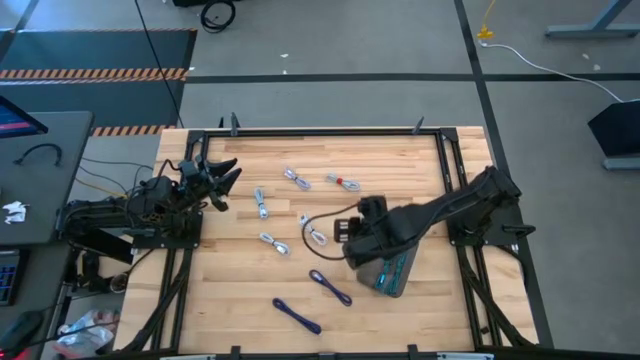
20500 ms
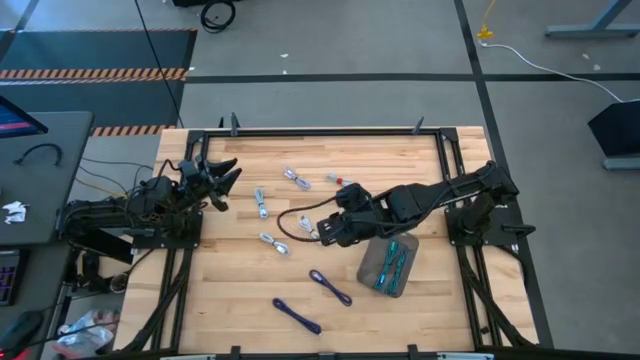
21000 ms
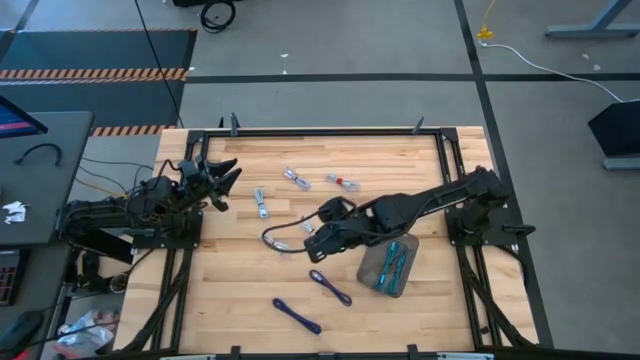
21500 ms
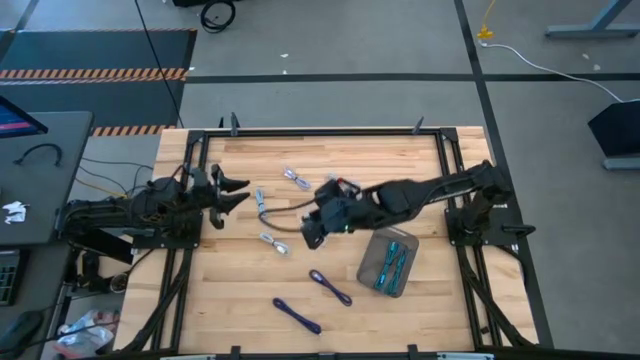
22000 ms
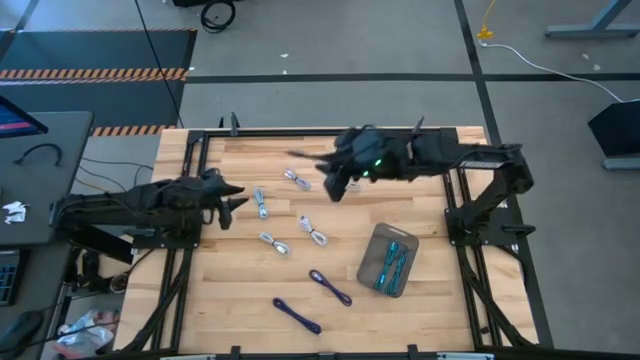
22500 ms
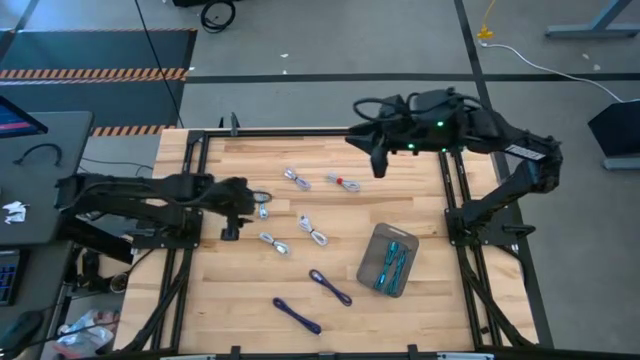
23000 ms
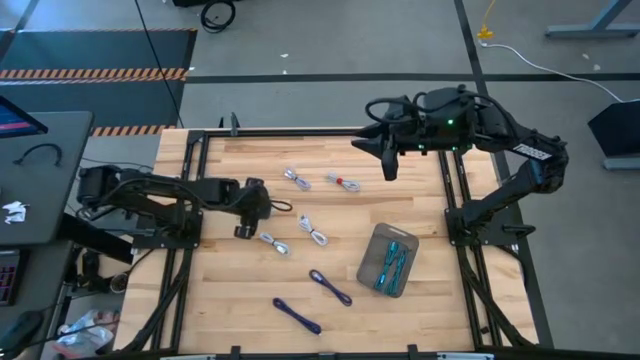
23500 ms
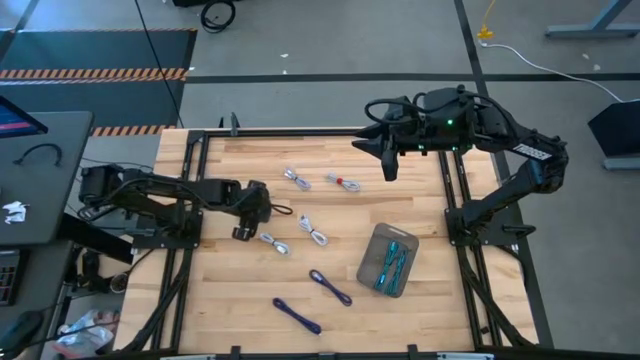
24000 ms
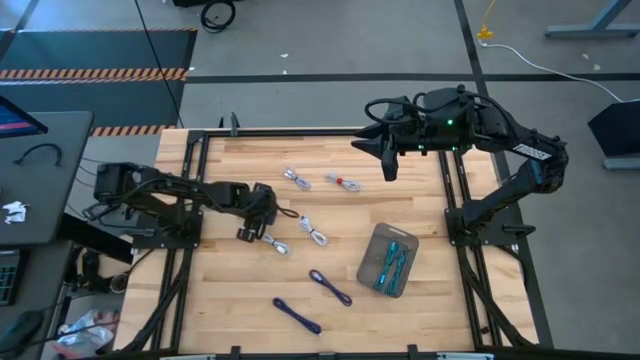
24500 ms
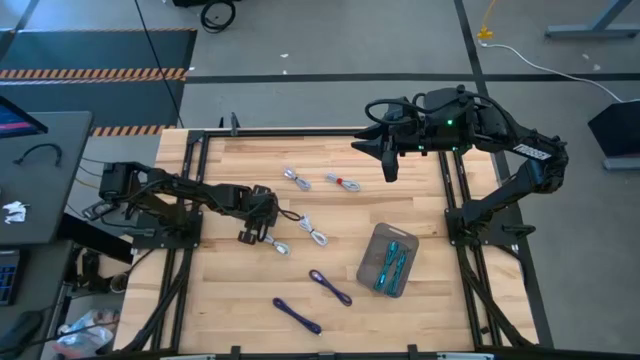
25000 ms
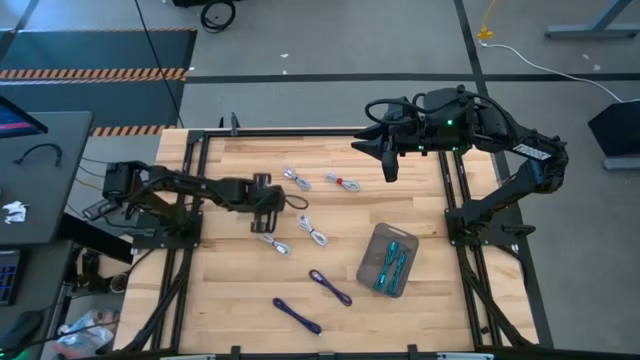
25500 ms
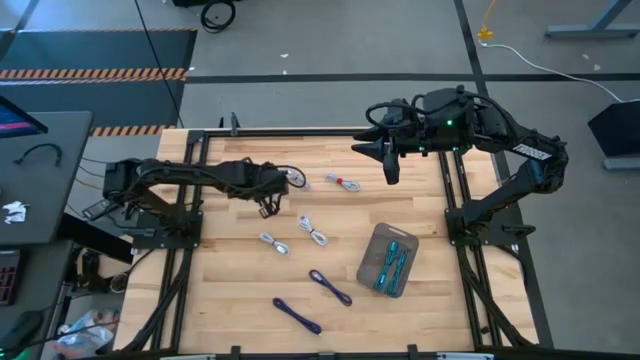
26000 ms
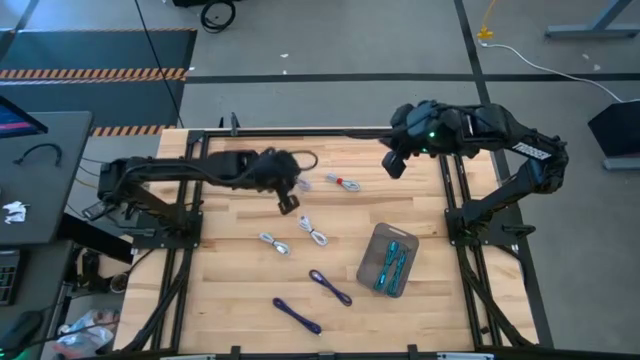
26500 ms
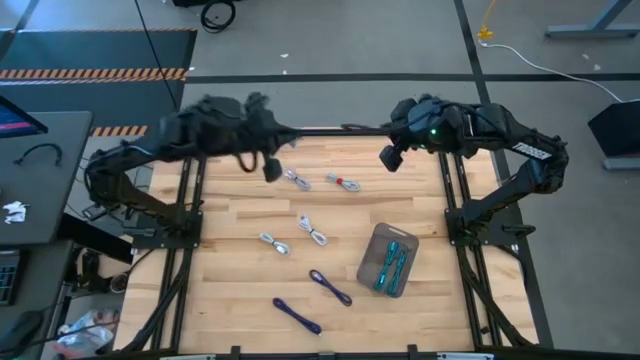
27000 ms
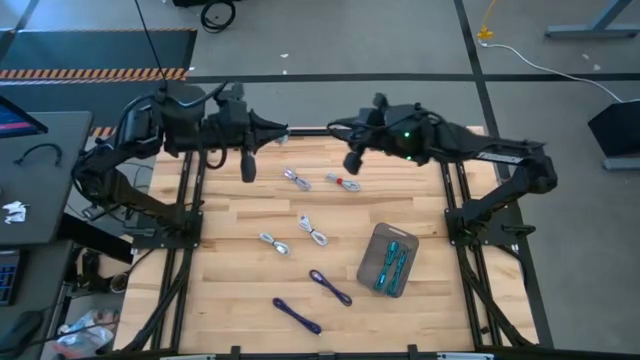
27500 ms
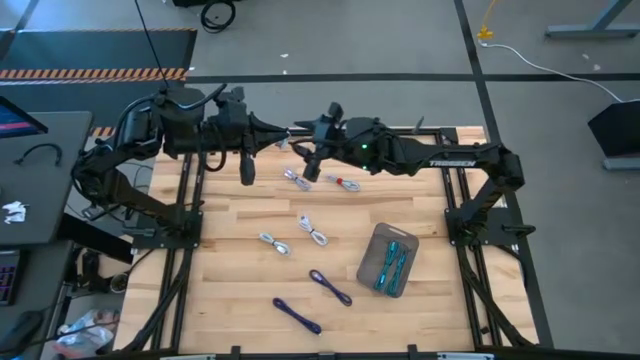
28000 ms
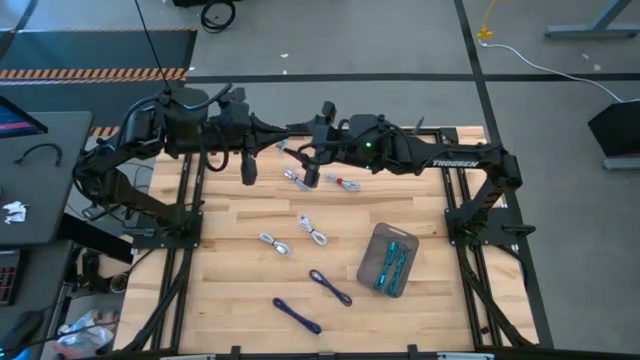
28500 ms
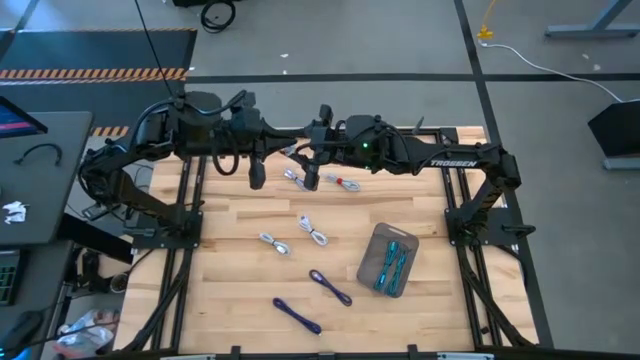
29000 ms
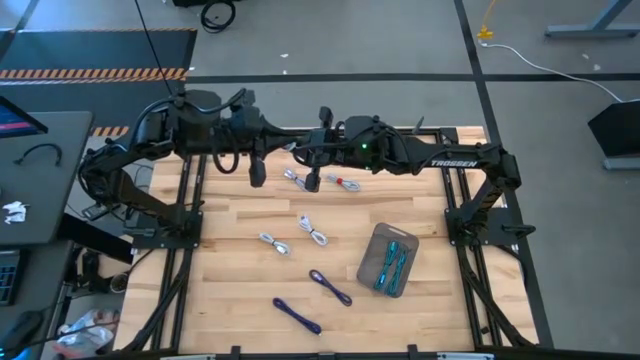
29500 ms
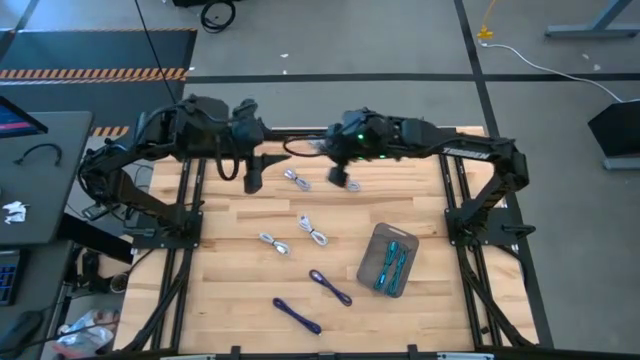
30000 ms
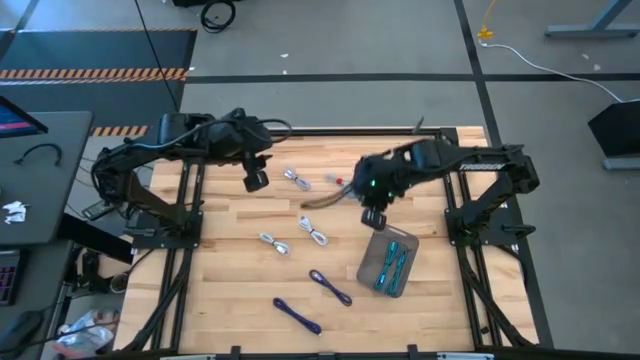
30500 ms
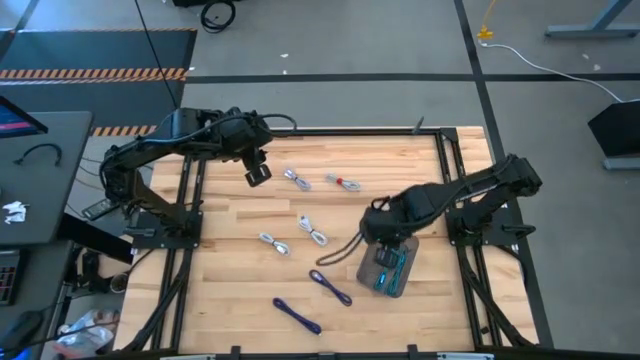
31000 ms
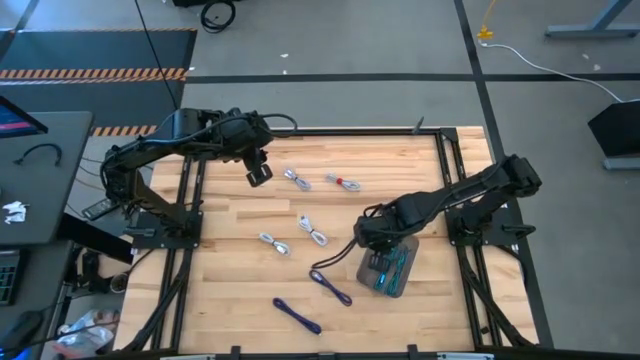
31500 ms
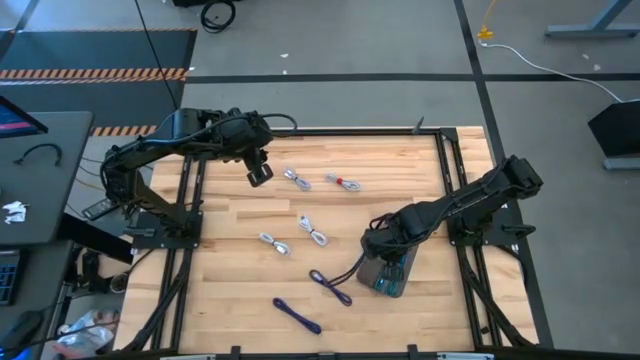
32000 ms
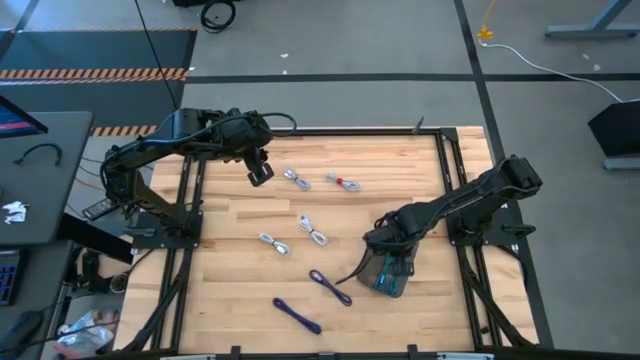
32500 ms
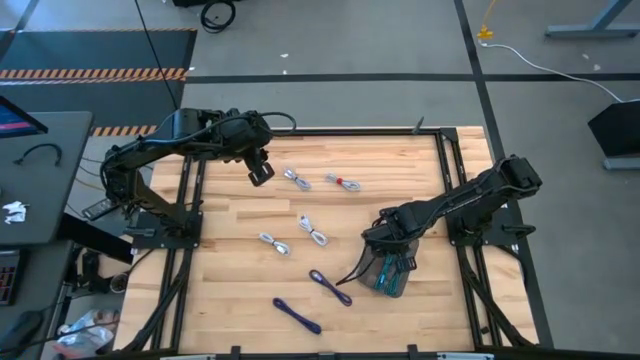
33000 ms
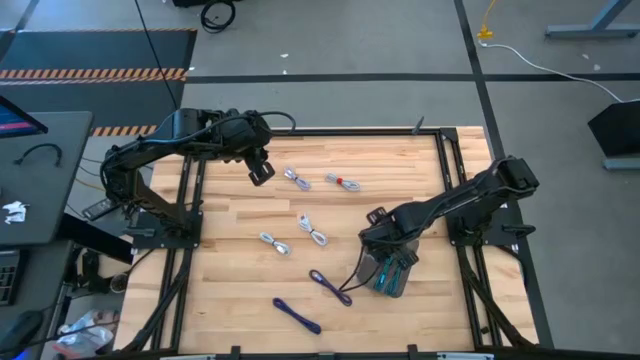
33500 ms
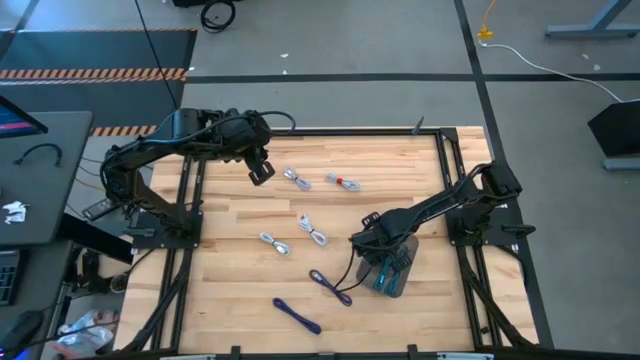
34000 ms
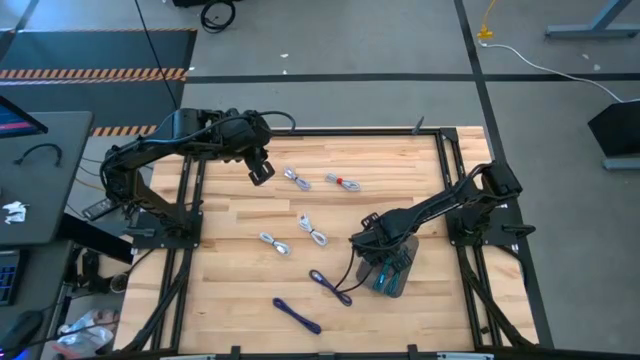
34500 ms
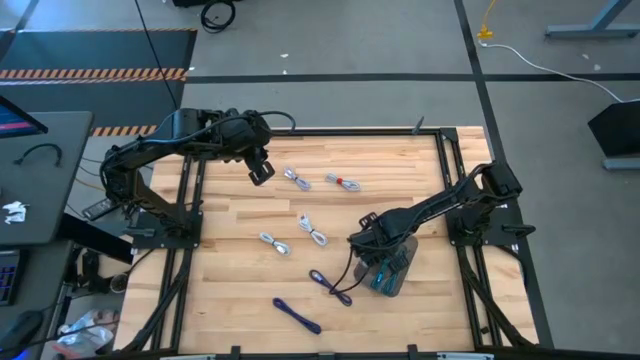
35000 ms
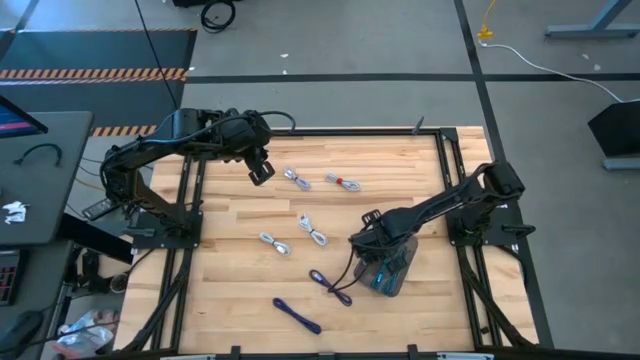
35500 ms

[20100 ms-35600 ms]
Task: Pick and place USB-C Cables
Put the bottom light blue charger cable into the gray bin

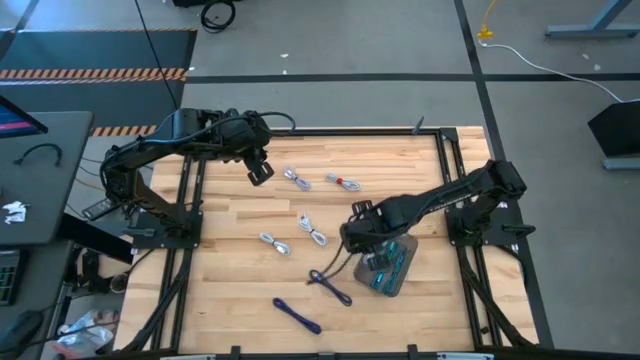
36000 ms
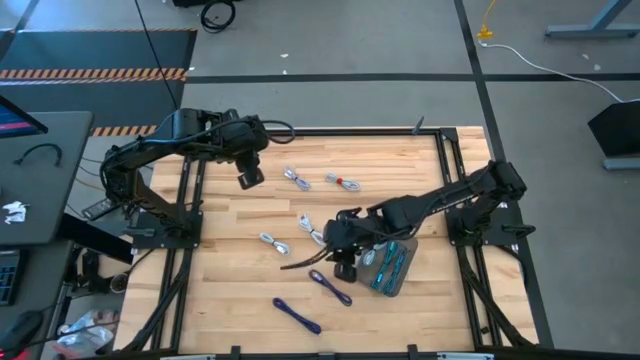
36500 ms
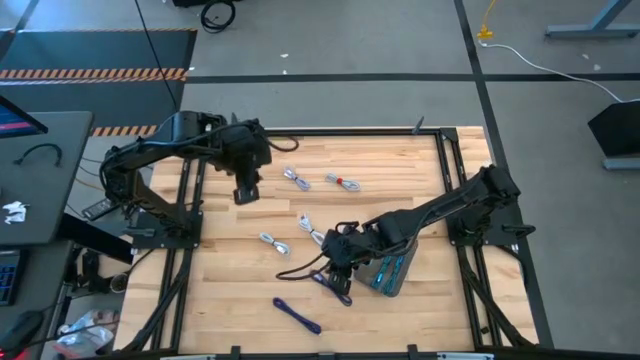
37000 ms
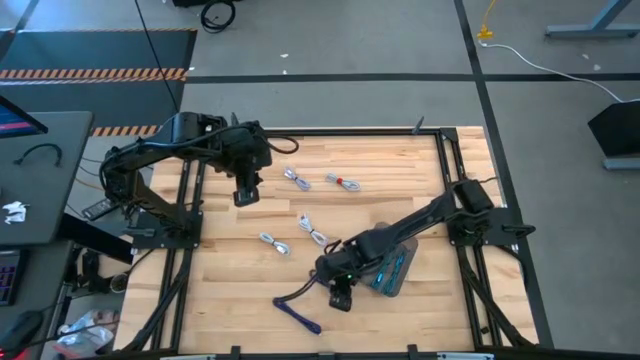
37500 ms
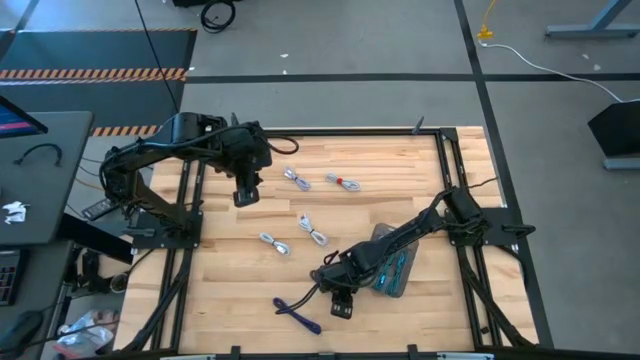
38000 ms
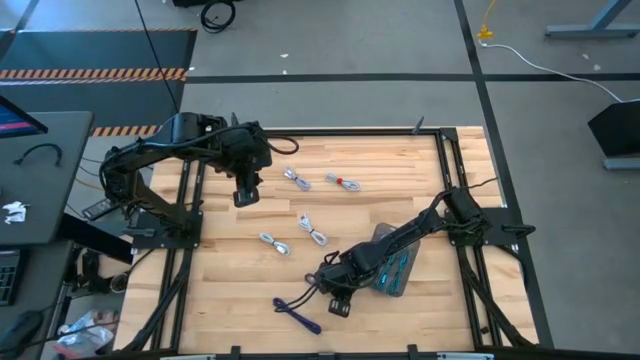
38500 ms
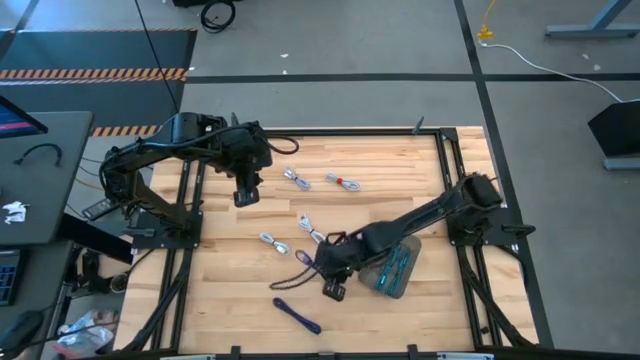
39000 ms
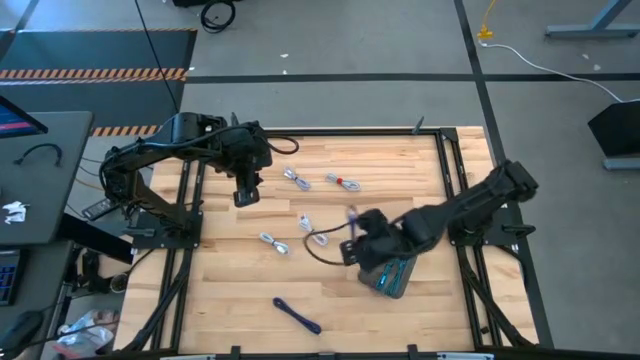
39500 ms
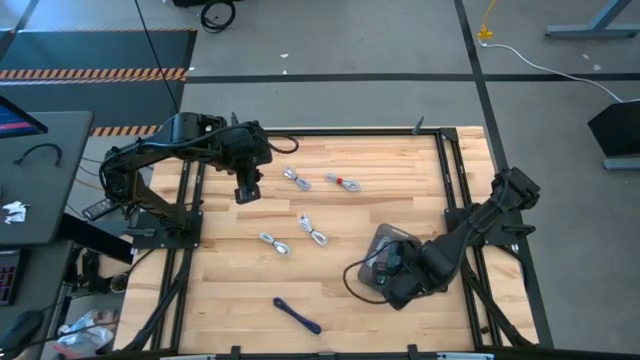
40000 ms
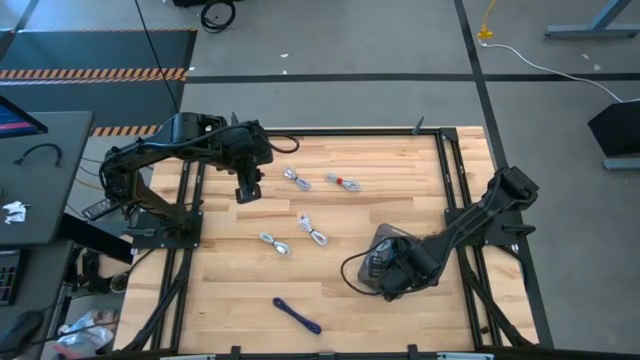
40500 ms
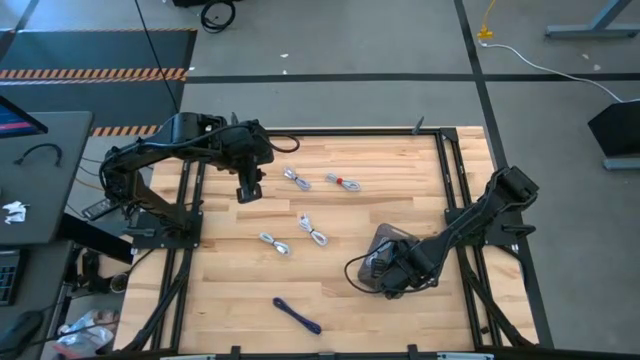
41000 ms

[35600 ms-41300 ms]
Put the top purple charger cable into the gray bin
